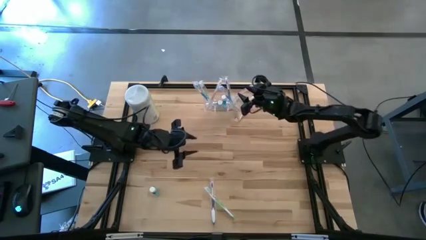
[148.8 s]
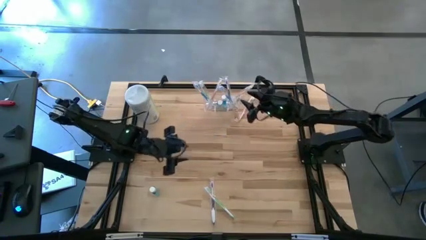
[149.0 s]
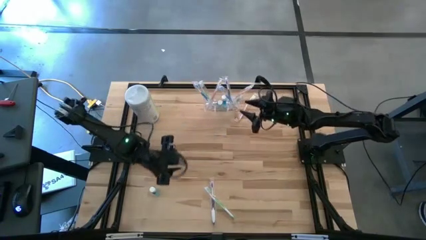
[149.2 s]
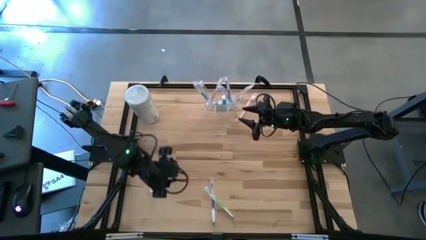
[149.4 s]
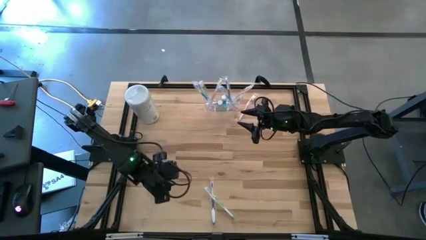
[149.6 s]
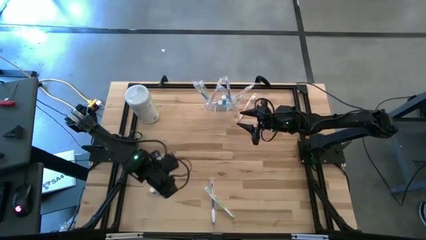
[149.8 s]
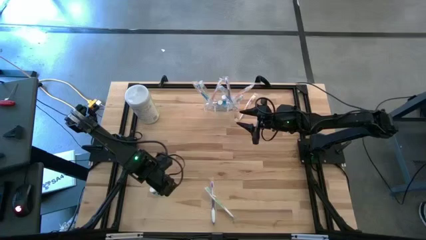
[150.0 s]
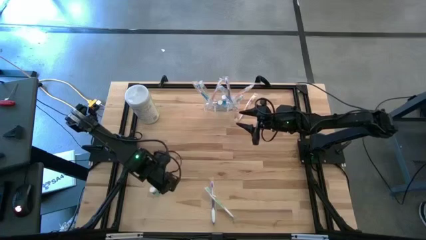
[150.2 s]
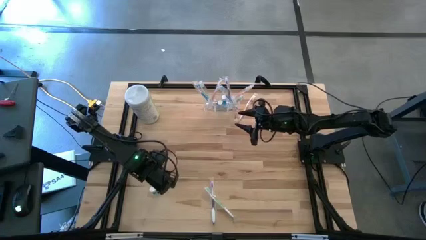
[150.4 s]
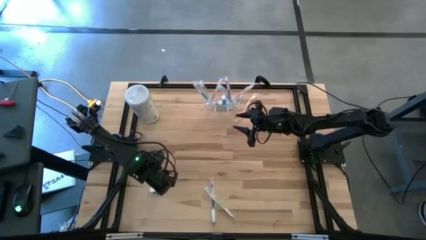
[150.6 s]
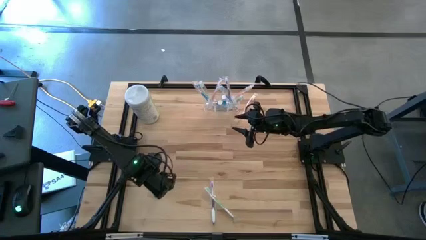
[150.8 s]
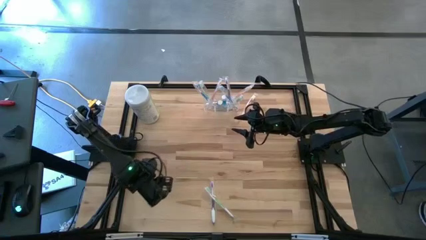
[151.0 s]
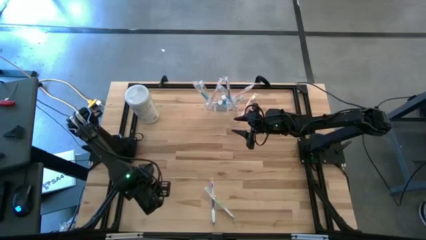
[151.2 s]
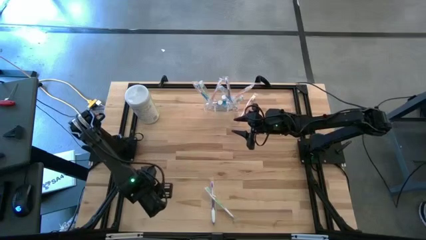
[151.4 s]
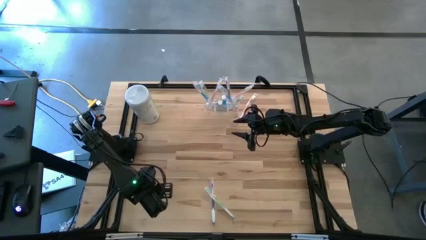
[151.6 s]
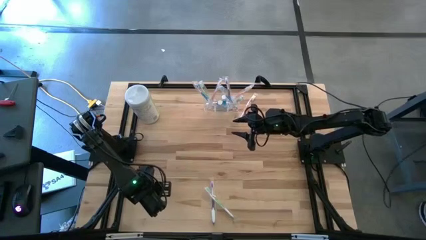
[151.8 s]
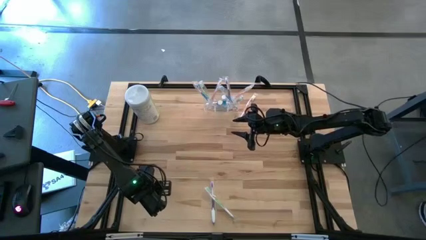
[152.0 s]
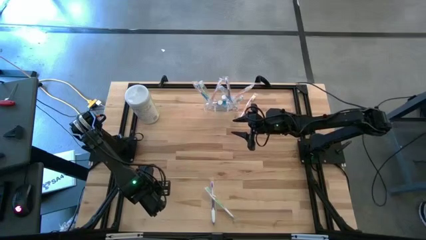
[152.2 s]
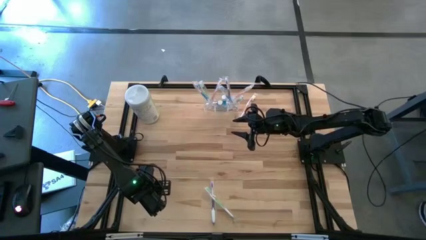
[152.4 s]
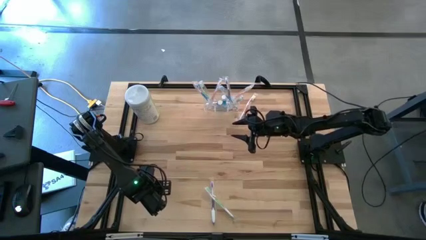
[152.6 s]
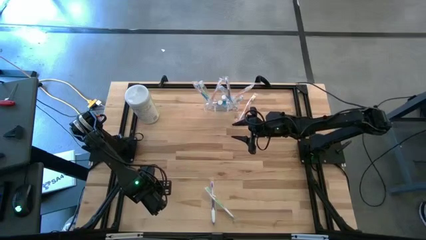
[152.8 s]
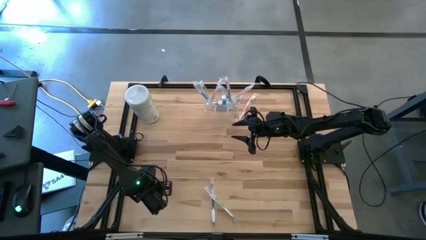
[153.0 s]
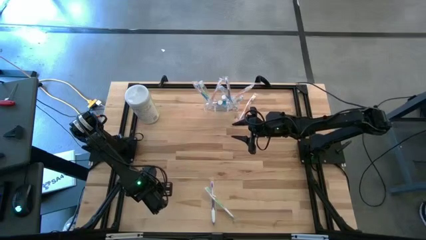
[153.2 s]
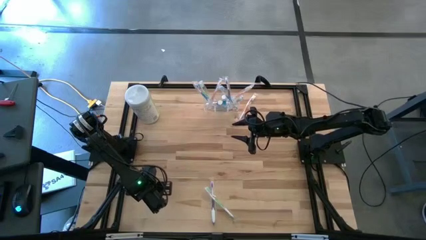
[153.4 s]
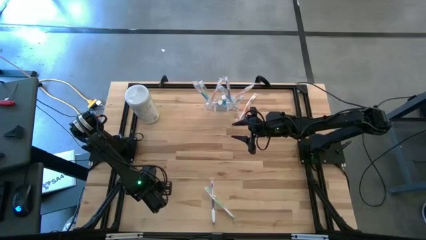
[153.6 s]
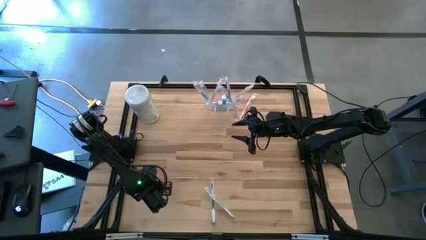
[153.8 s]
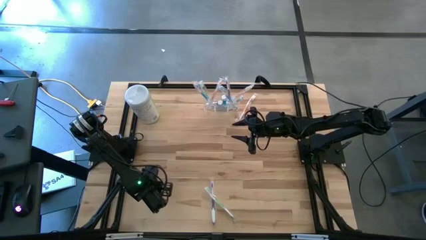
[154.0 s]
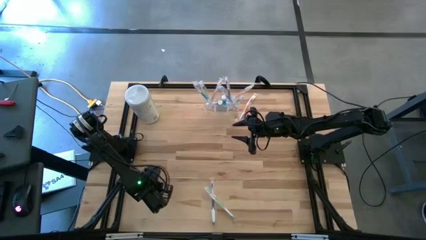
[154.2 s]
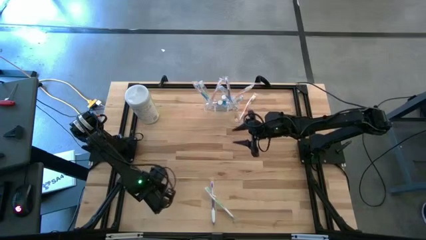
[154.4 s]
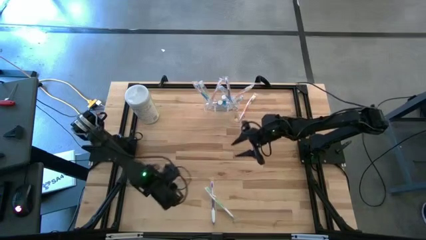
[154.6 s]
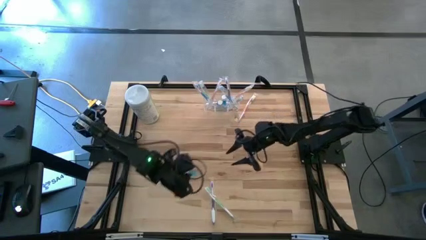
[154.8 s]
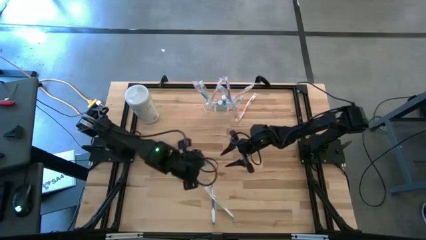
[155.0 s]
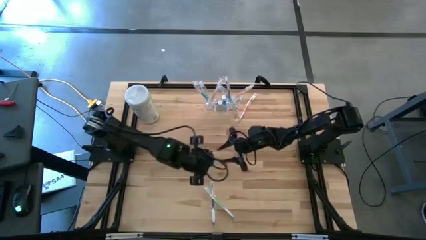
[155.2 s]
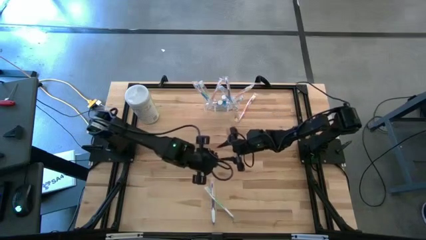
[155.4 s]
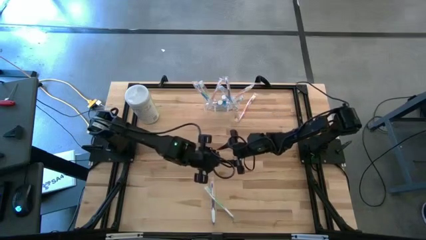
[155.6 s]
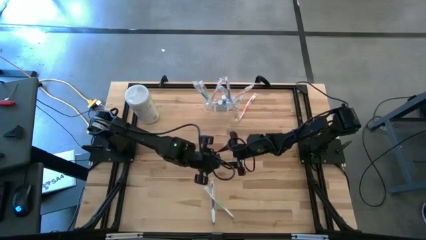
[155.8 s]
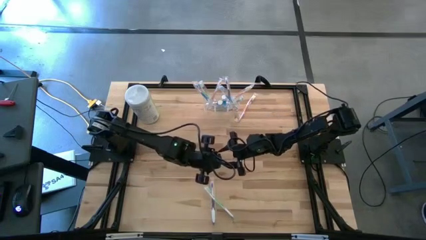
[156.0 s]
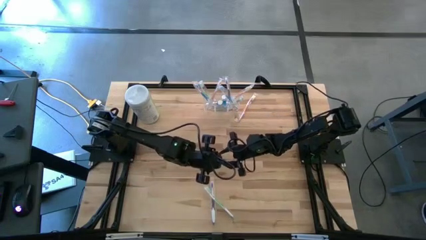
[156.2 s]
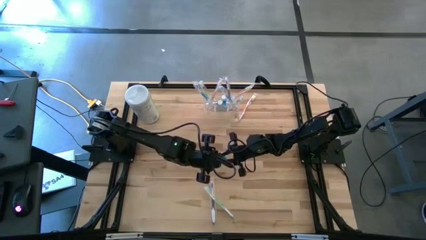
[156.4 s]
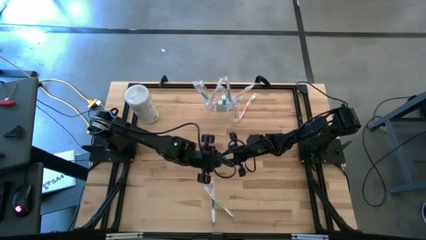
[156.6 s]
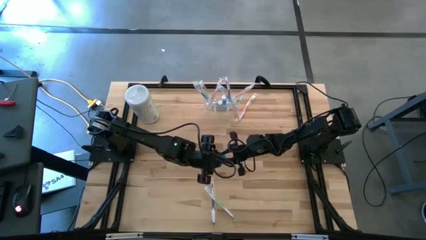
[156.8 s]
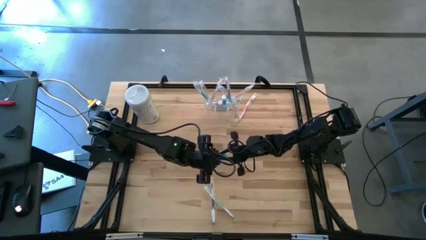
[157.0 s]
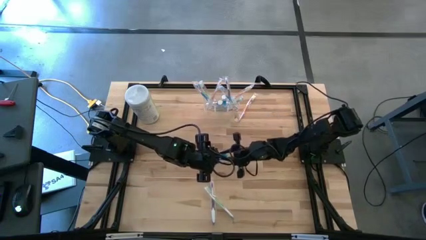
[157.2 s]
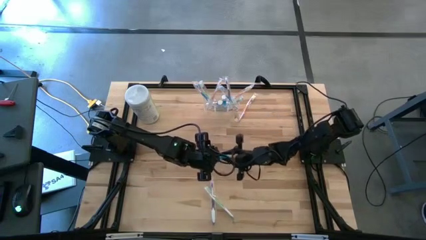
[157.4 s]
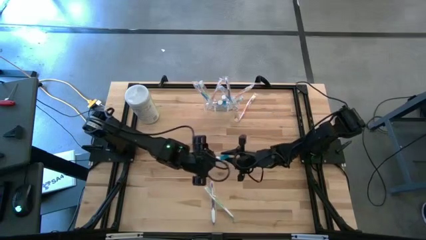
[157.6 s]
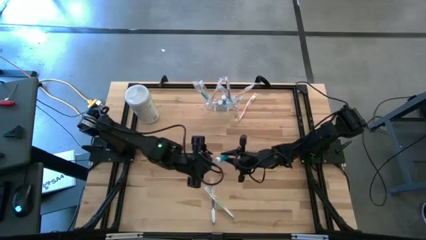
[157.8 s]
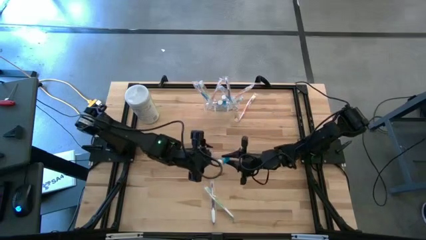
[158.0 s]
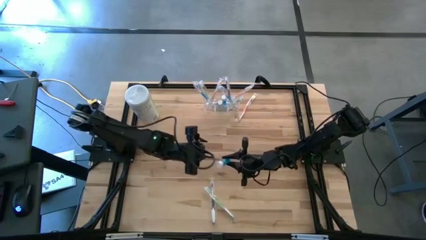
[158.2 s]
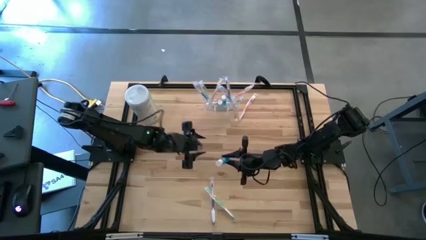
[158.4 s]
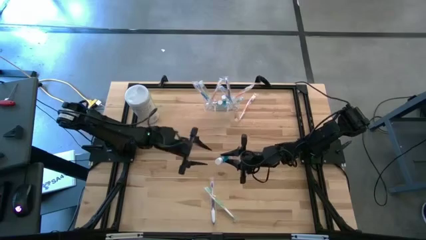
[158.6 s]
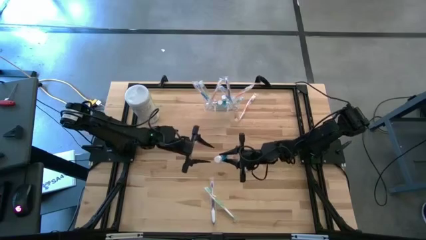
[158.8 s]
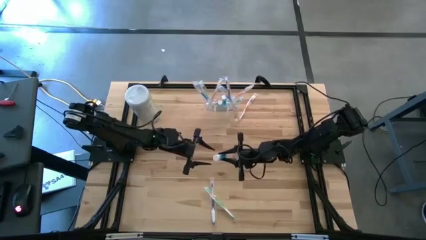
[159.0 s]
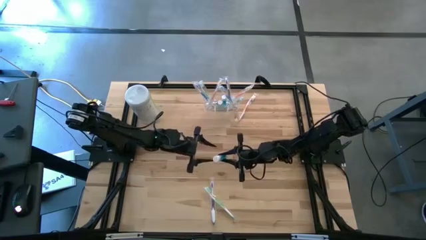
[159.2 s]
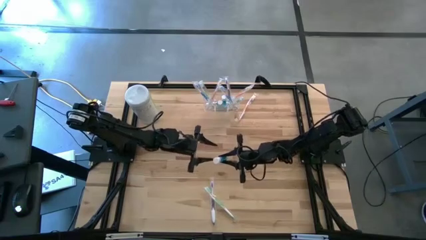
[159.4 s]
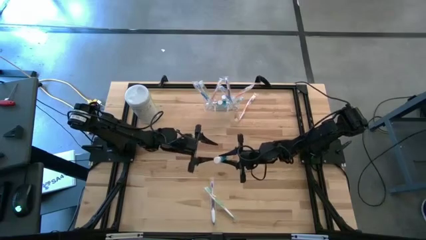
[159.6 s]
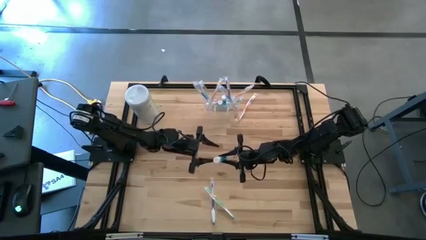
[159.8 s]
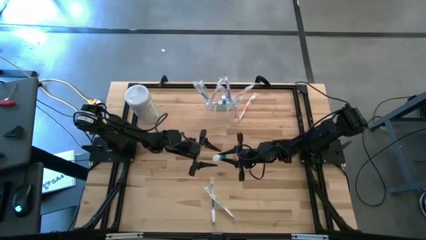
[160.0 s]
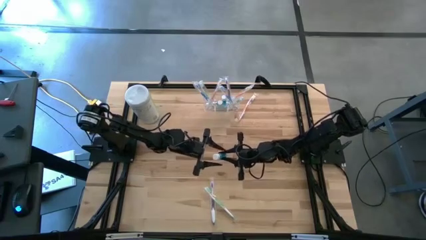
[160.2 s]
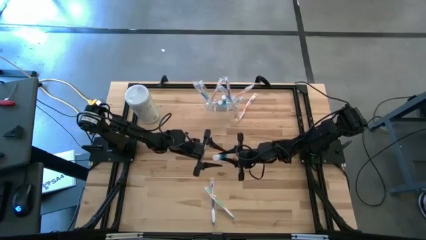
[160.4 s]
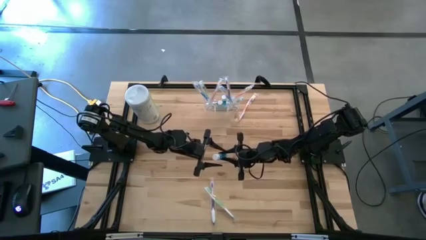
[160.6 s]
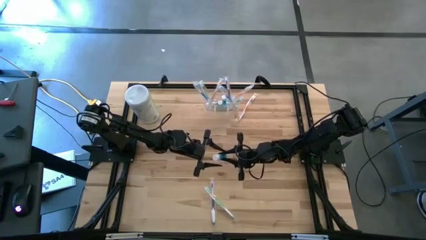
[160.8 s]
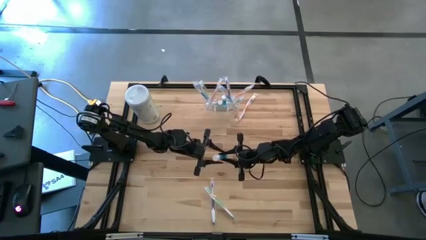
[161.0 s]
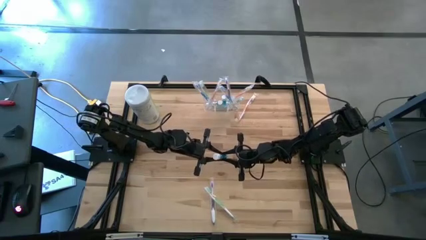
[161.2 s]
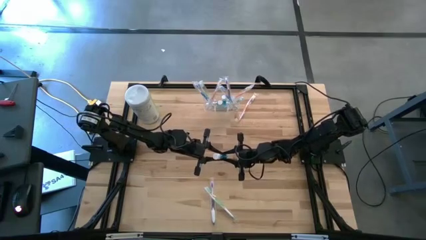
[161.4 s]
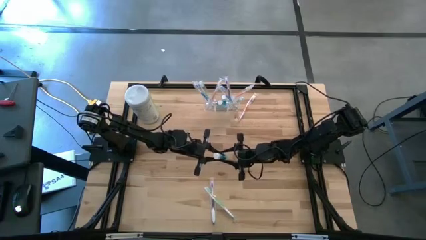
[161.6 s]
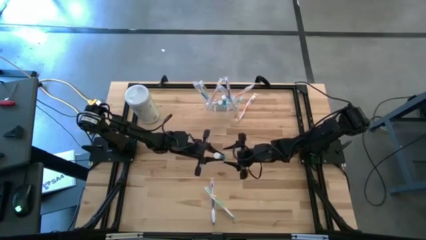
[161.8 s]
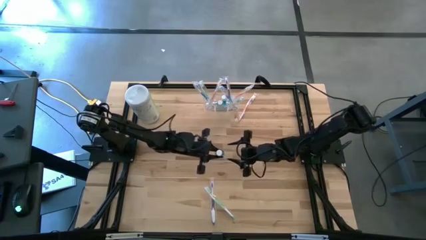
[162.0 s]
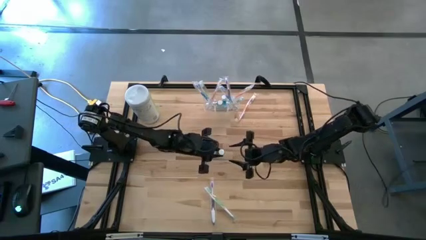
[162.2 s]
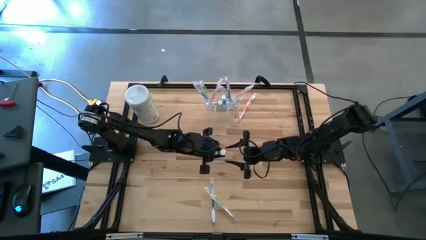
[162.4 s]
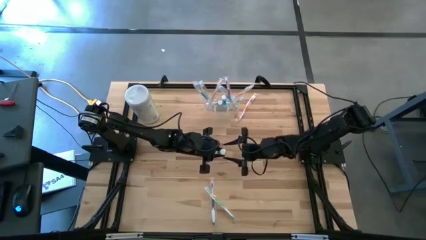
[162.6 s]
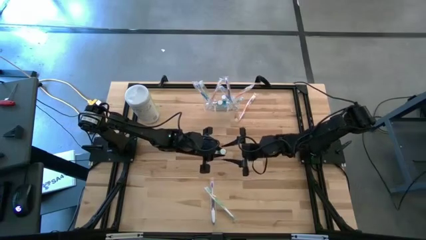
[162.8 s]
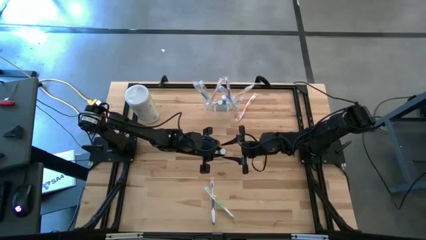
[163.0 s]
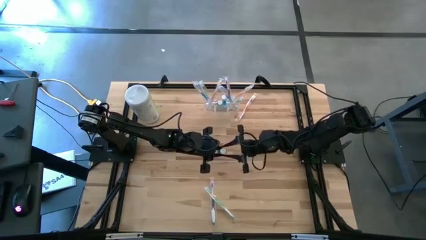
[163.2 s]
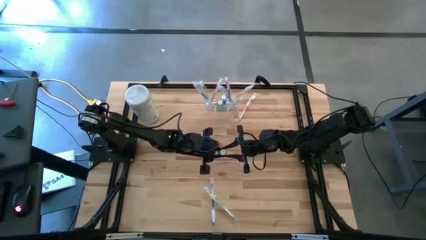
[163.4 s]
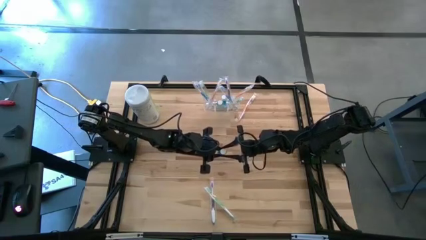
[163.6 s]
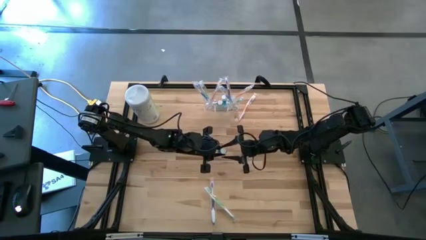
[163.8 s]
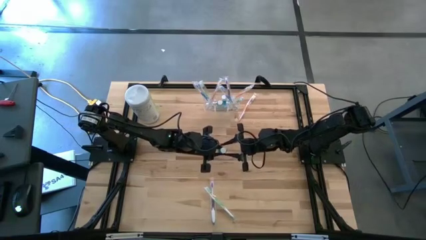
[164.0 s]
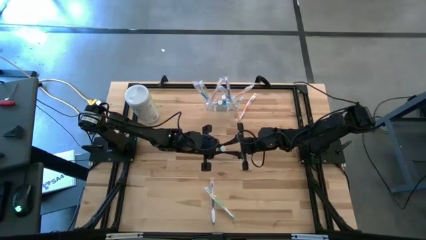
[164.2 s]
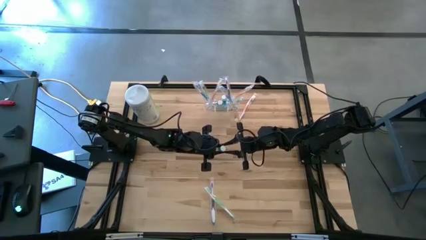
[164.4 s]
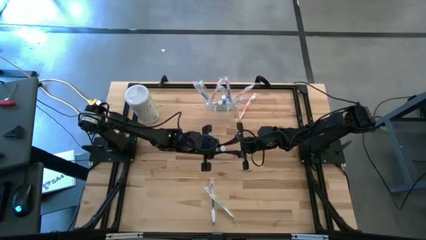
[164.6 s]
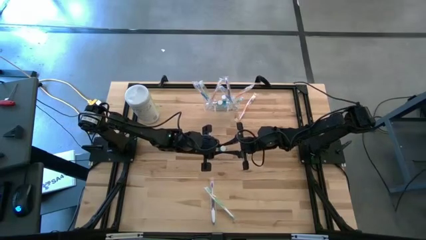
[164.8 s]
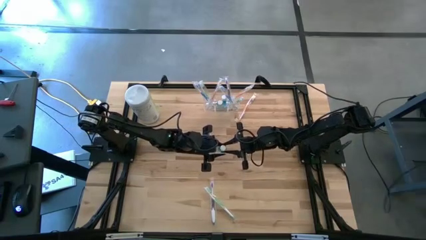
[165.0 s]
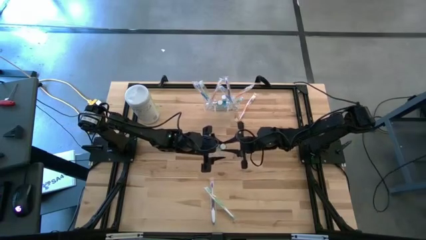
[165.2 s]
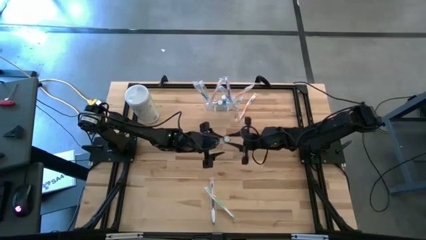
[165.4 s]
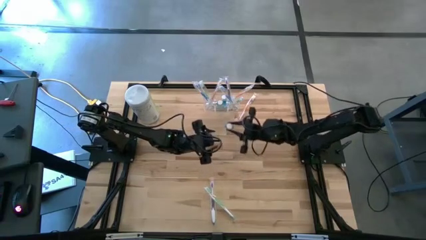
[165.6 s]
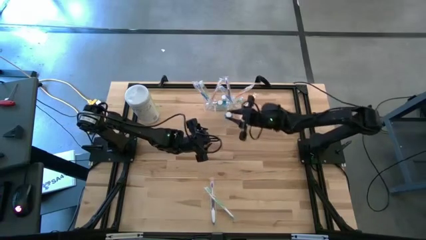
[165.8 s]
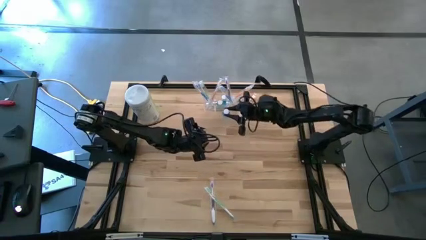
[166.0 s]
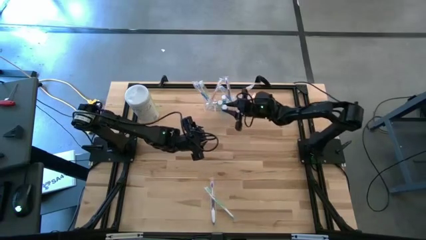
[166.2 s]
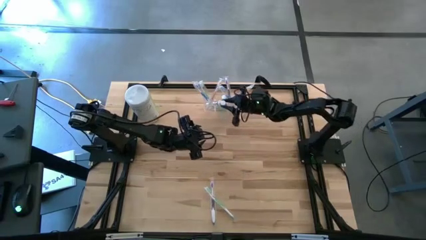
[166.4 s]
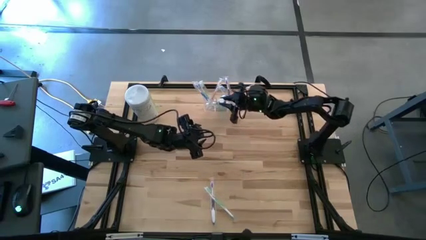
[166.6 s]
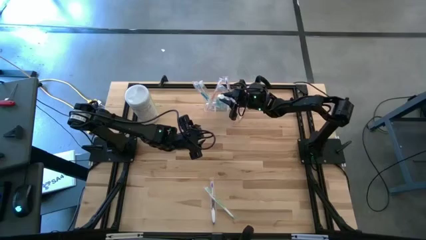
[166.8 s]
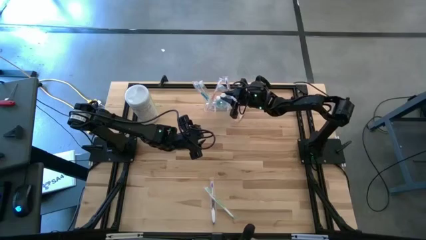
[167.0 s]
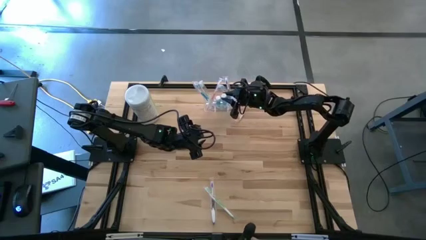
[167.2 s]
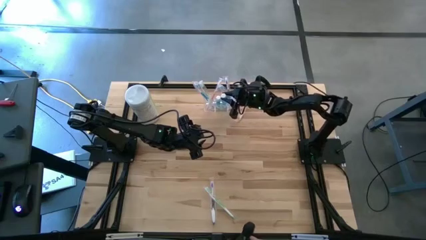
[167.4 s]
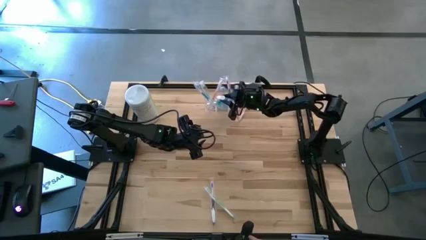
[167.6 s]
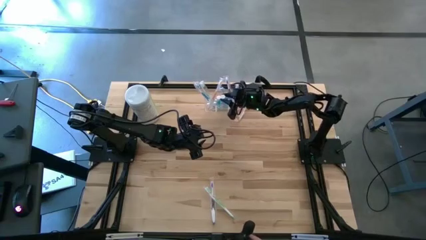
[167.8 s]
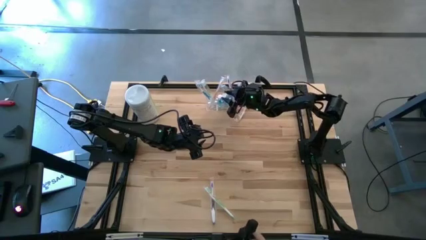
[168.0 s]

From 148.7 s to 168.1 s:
Task: Pick & Place toothbrushing station
Put the mouthwash into the transparent organizer
